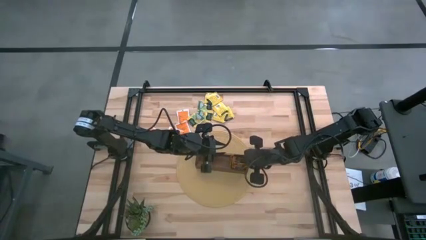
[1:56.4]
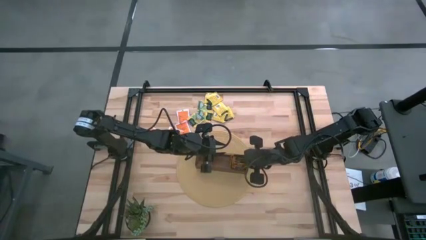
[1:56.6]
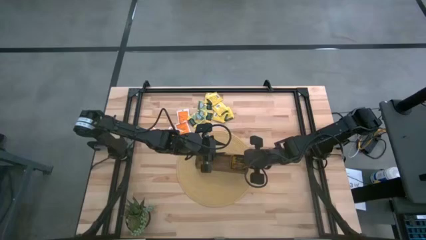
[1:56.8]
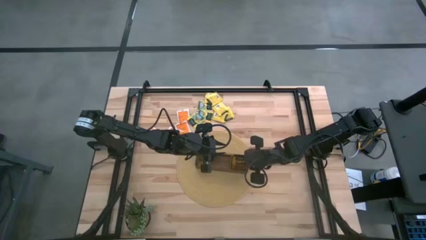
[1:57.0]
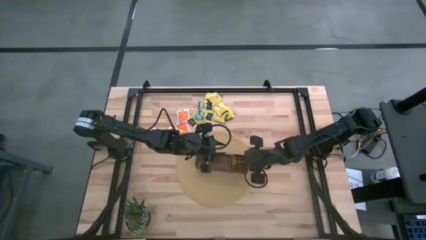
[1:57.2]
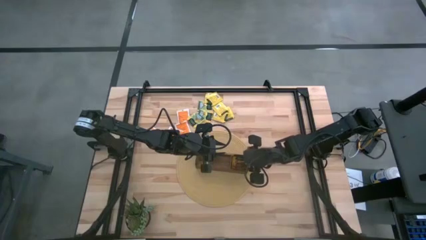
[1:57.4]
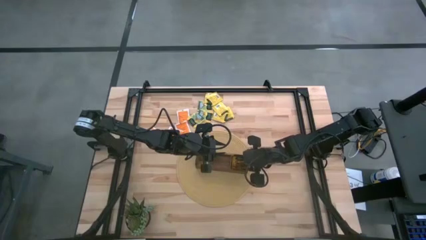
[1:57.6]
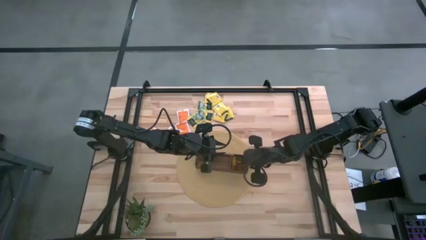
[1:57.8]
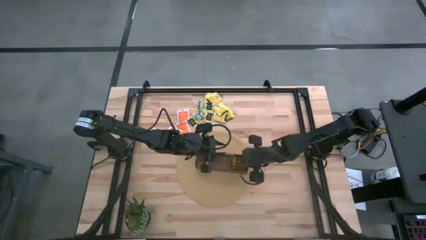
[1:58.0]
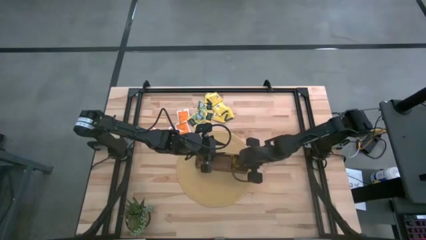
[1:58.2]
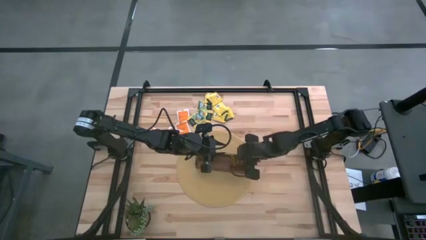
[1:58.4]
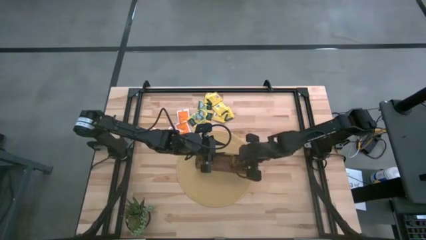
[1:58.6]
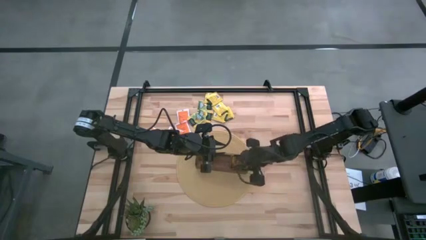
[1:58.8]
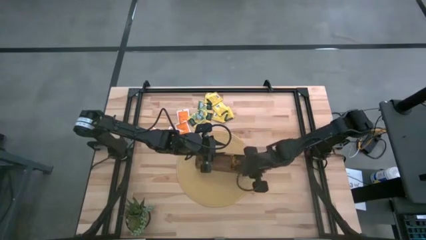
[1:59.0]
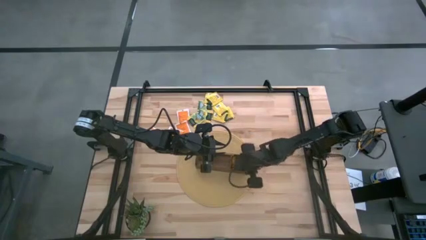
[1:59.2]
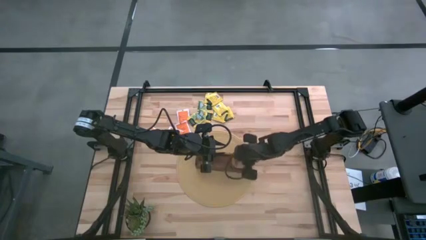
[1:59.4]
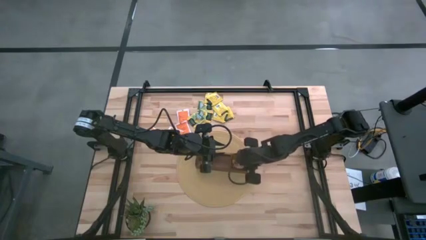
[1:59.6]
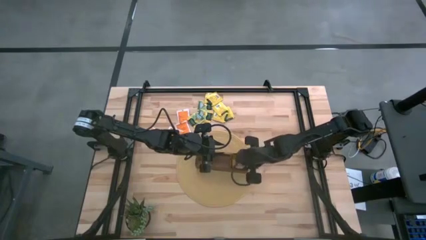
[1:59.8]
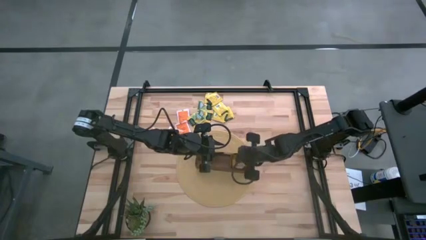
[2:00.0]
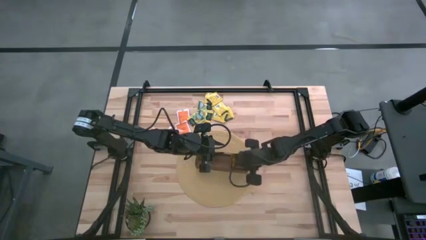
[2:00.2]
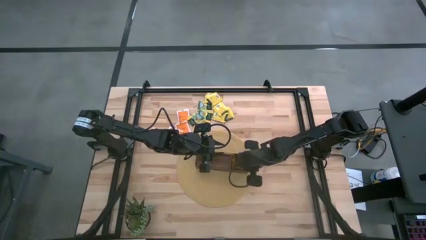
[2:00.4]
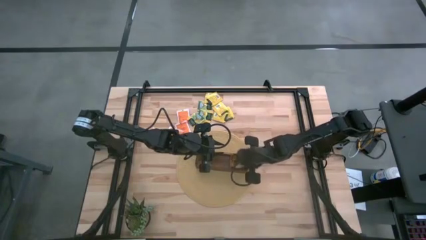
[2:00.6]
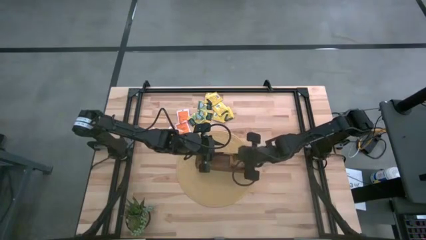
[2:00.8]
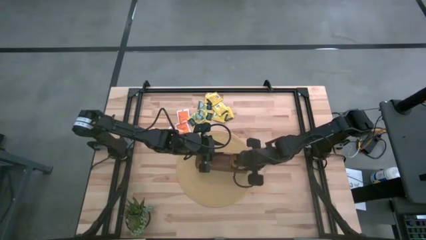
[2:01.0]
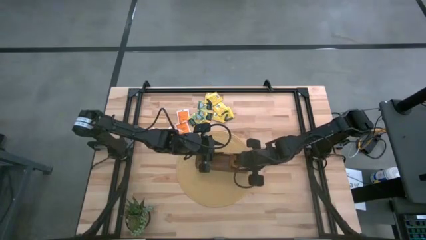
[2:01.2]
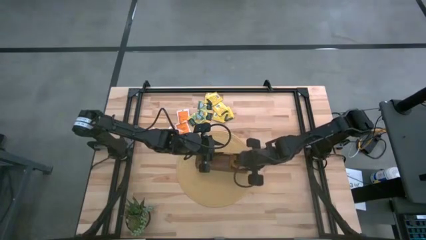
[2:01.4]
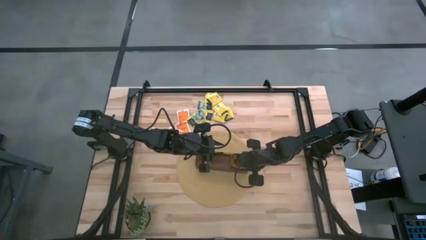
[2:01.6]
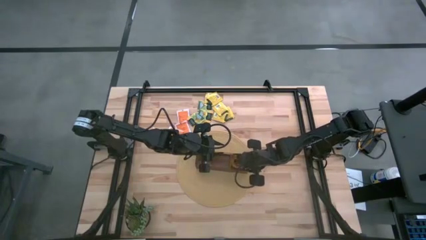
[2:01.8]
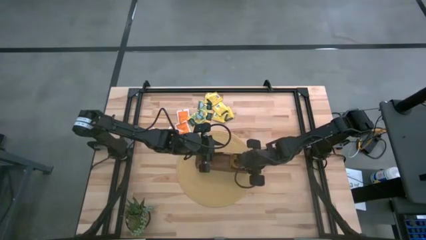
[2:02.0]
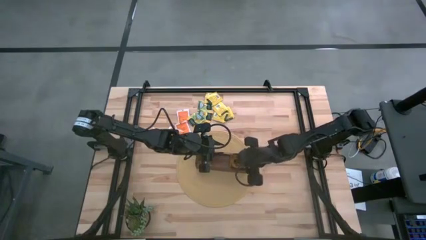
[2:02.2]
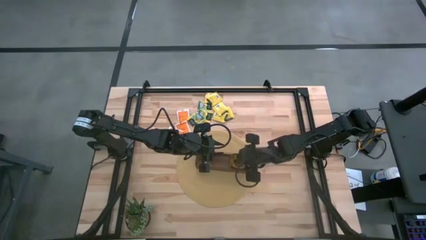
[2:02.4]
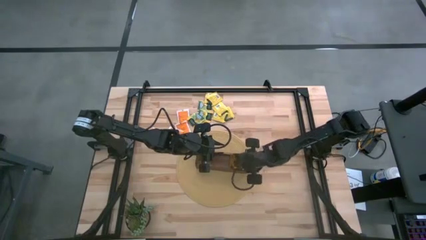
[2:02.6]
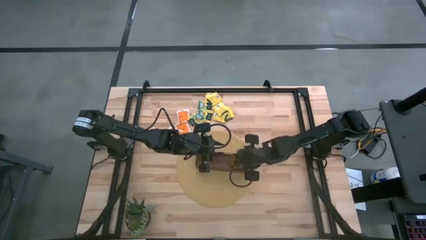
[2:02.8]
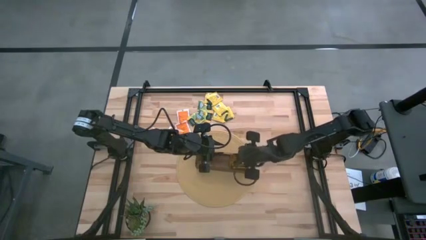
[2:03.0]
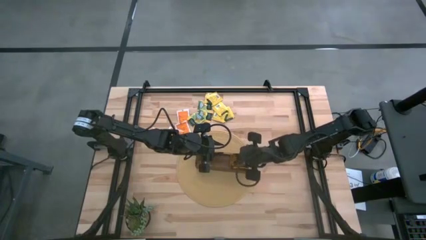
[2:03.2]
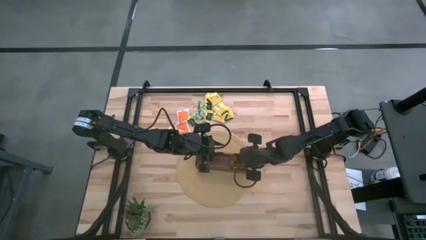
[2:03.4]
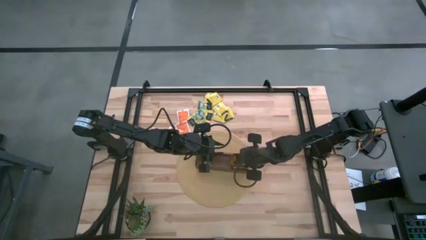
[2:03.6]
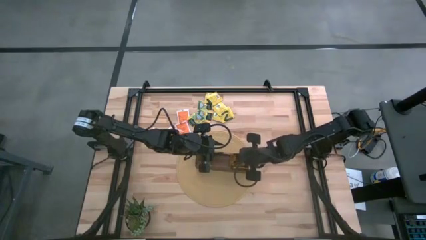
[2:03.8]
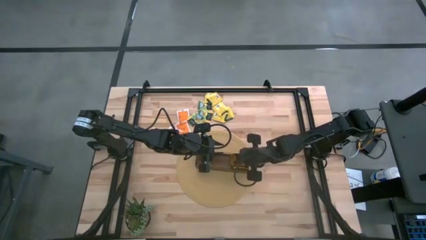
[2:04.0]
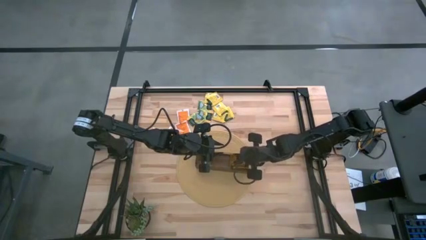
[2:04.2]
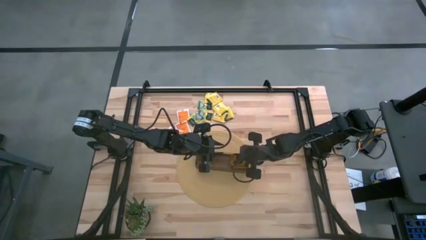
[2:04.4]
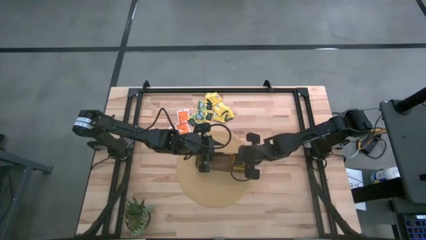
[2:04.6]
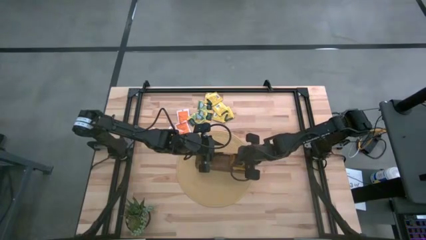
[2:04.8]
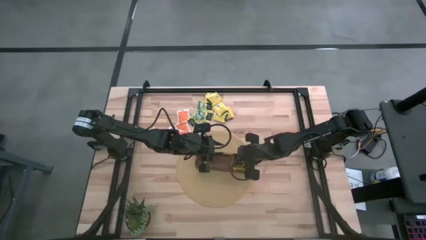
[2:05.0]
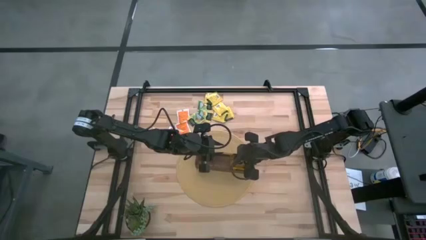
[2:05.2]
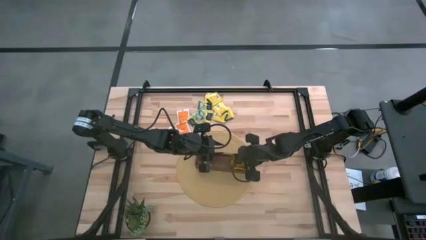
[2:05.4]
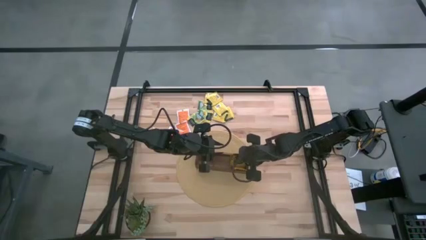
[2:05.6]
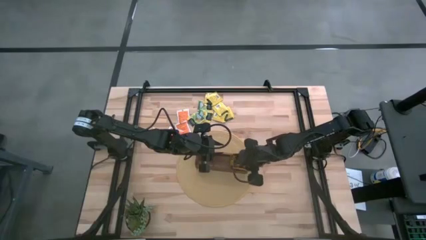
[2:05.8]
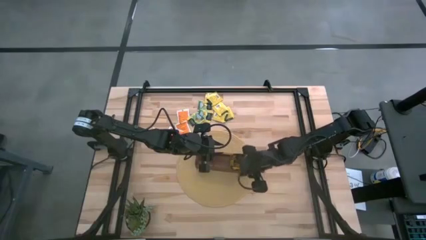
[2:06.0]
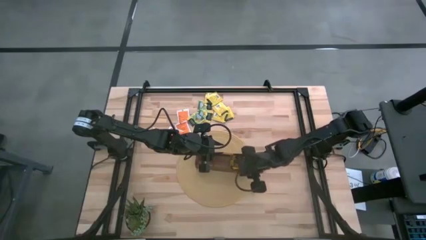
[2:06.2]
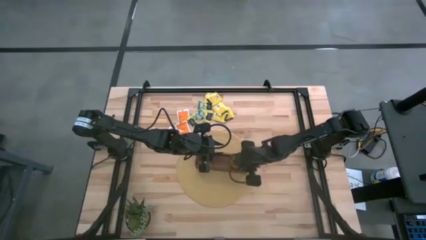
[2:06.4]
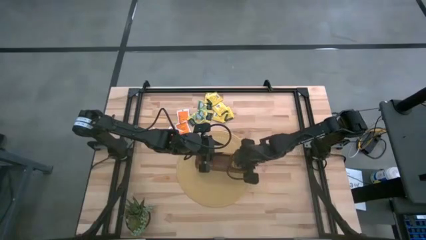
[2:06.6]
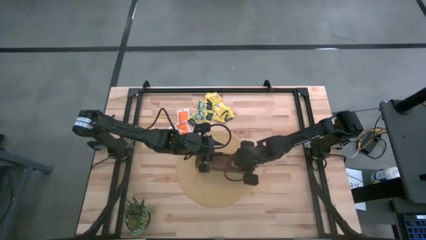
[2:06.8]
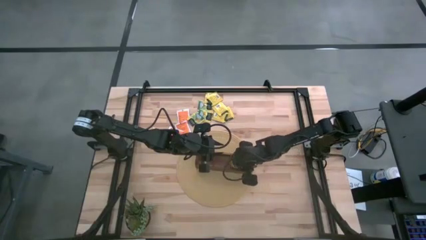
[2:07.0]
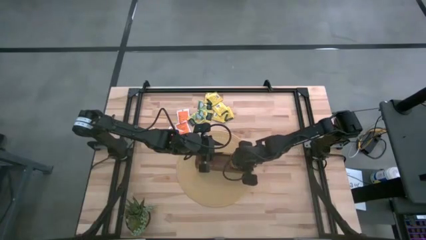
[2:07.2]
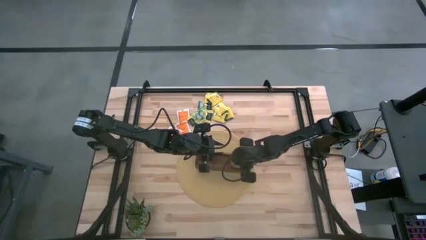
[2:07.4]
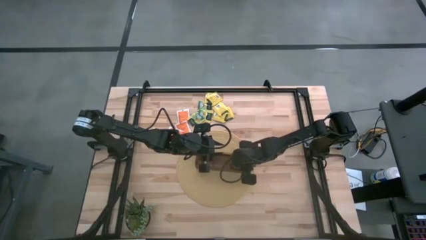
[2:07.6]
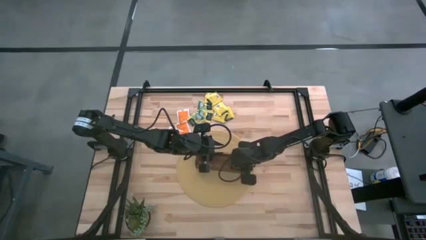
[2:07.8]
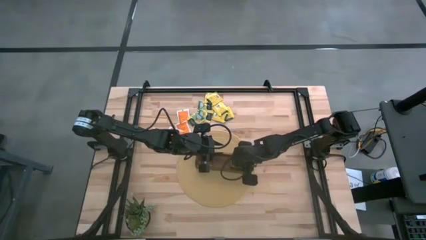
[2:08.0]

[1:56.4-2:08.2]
Task: Pick & Place Tea
Put the orange and green tea bag into the wooden organizer

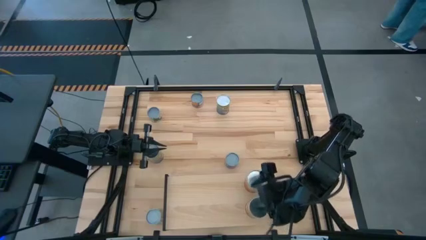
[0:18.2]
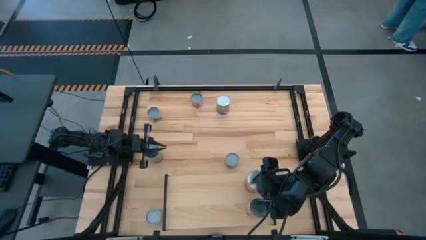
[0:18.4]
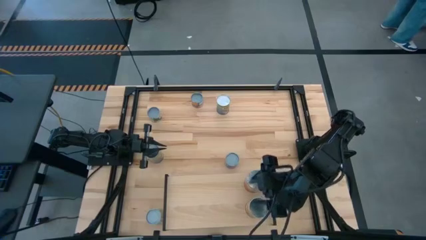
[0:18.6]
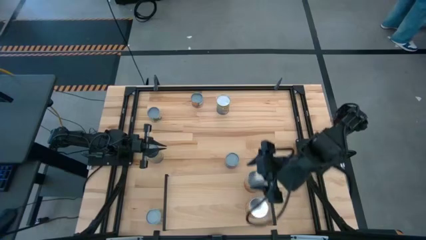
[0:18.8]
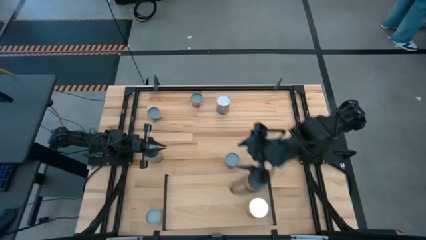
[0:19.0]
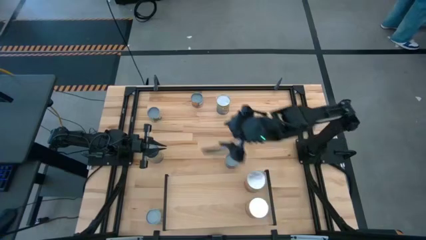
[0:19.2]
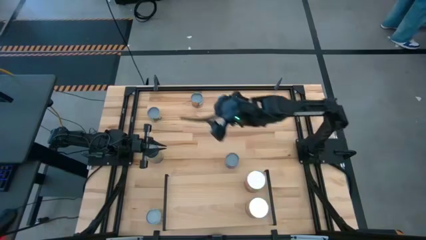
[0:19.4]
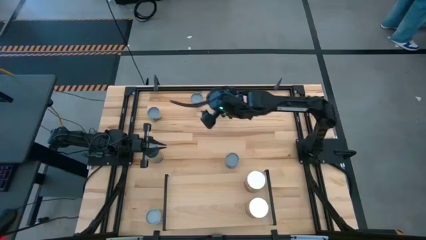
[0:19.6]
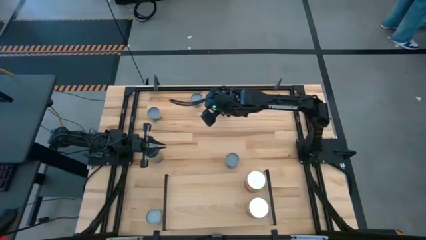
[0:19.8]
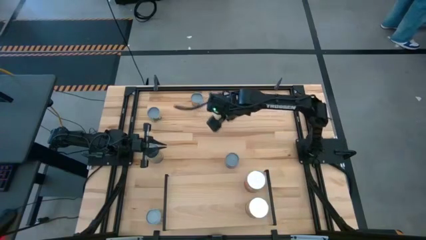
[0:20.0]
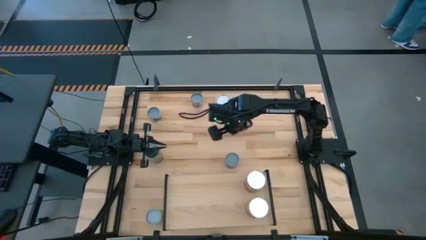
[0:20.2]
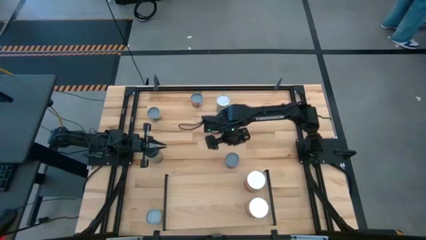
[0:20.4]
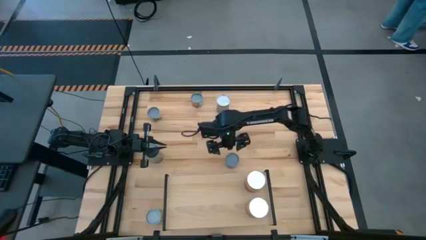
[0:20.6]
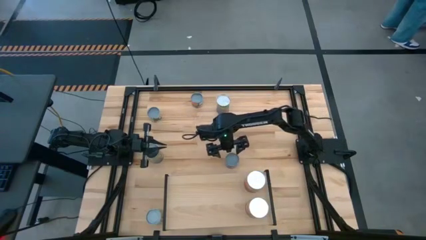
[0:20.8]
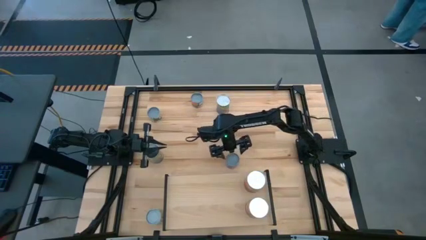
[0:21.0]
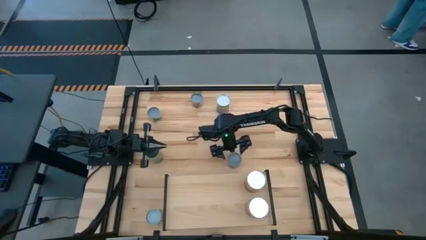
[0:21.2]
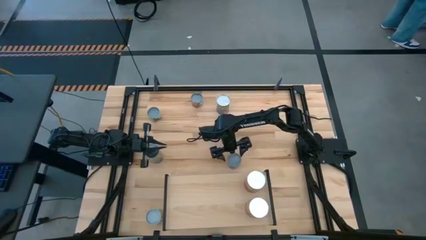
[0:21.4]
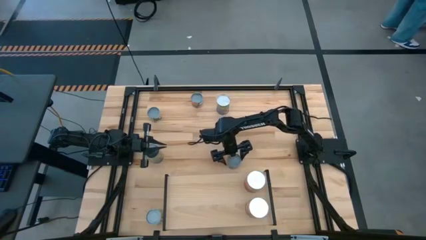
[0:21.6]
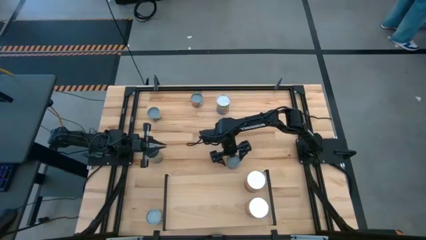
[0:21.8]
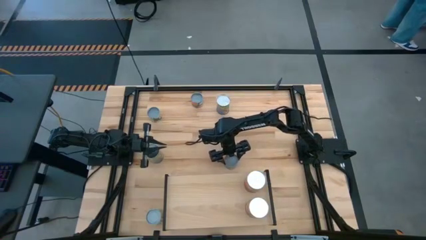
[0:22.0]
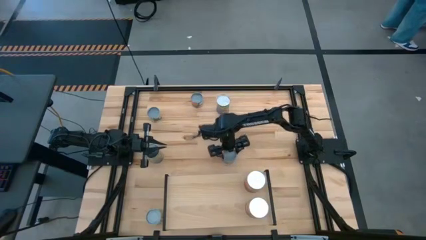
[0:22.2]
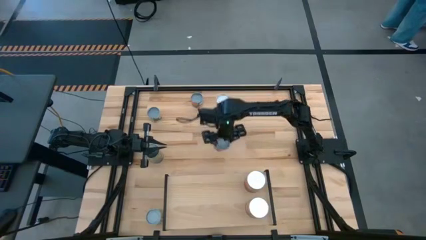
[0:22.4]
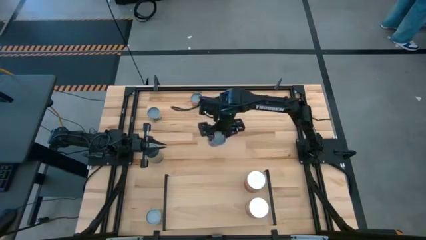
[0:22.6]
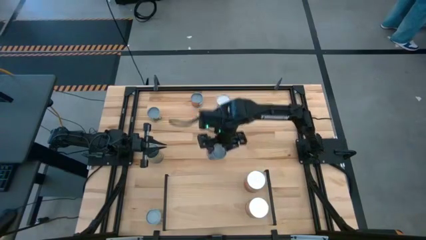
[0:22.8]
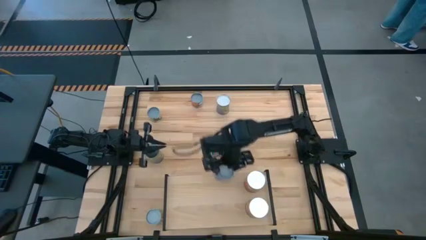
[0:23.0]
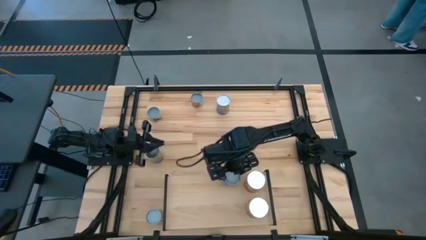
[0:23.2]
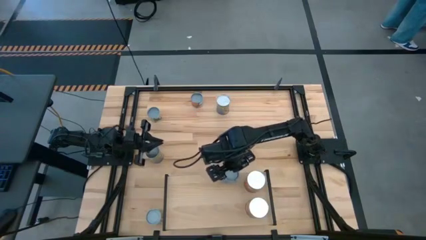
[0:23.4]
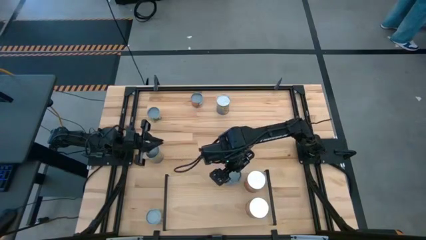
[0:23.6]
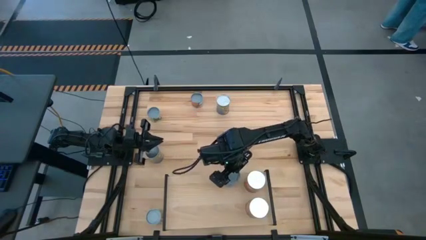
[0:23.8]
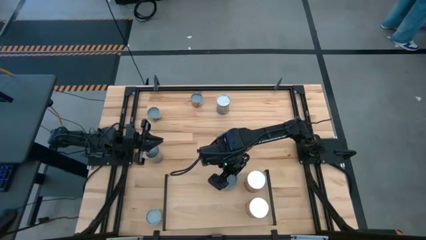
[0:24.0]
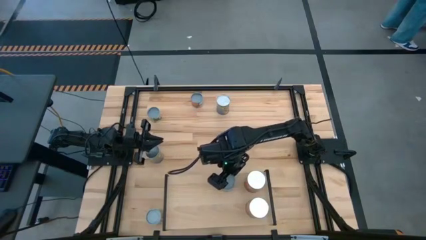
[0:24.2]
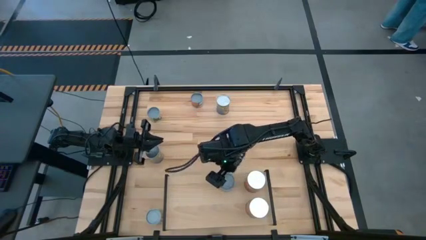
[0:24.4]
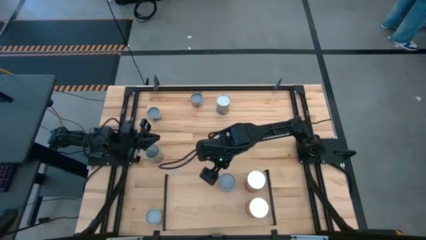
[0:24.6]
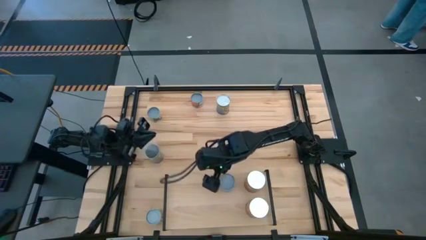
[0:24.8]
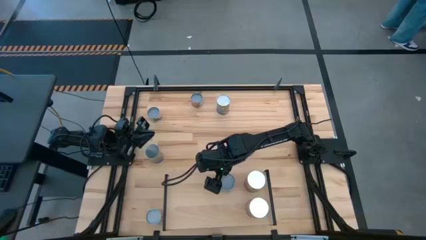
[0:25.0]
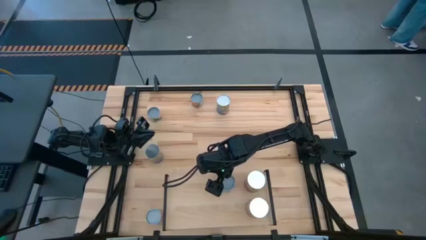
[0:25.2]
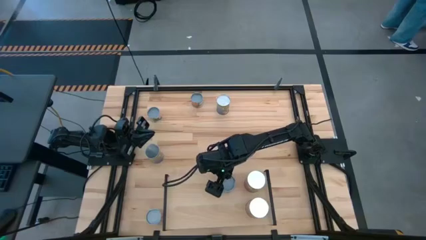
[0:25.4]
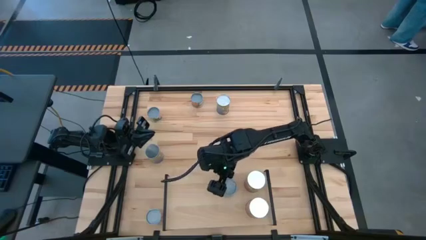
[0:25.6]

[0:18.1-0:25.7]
Task: Pick and place cans onto a shelf
Put the small canned corn on the shelf
